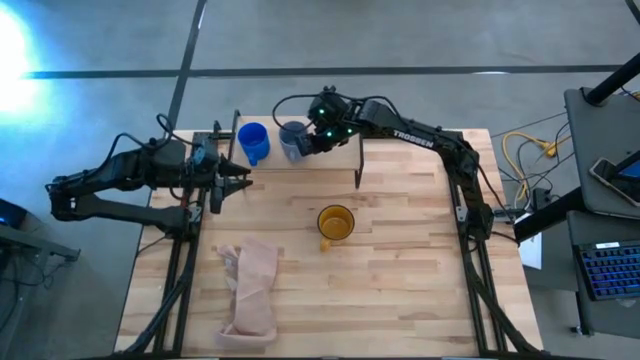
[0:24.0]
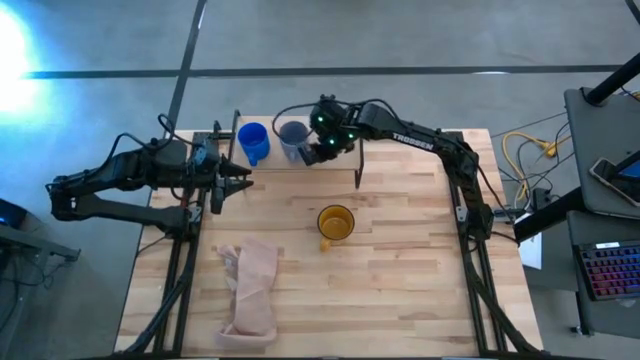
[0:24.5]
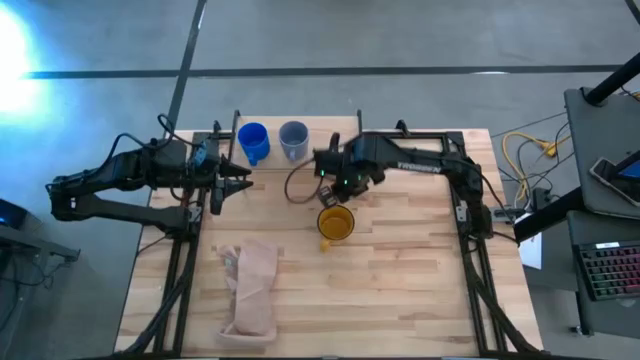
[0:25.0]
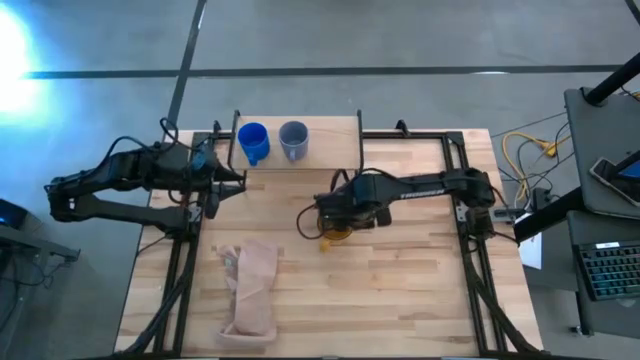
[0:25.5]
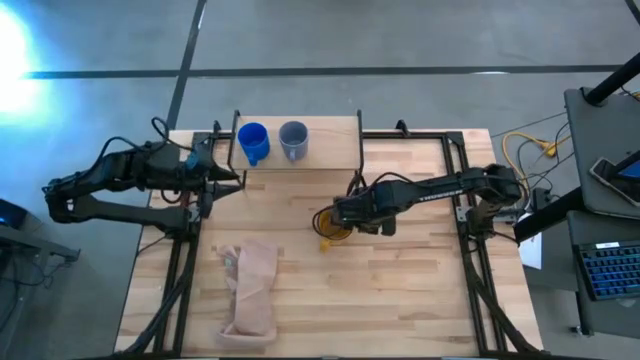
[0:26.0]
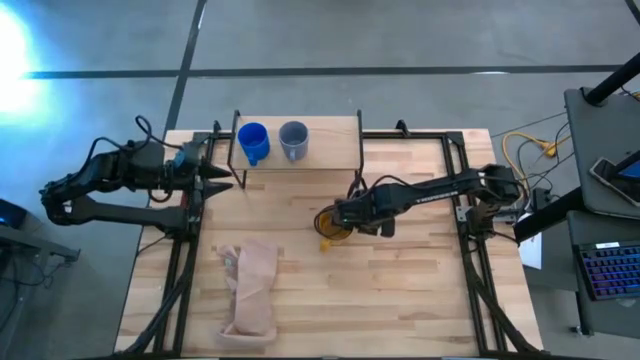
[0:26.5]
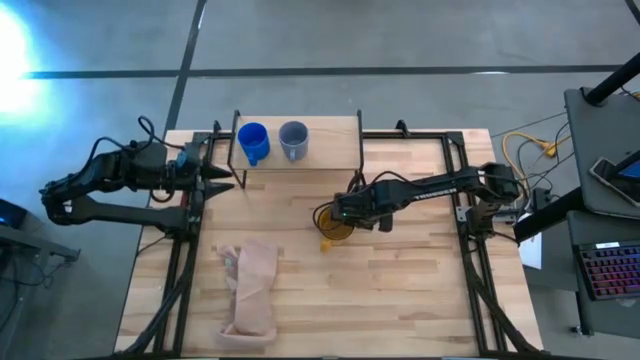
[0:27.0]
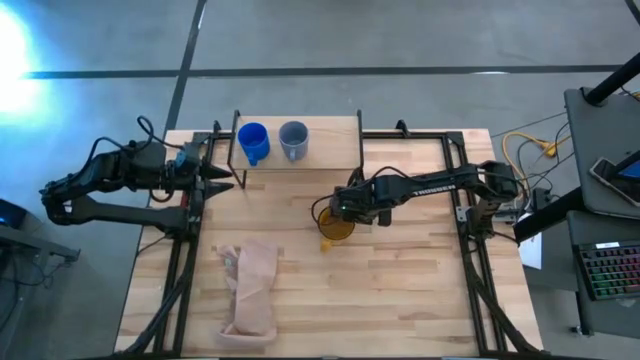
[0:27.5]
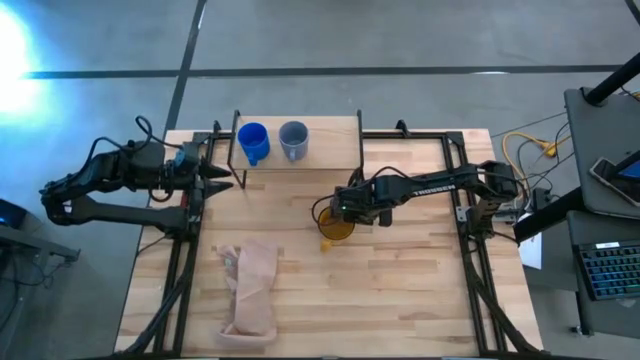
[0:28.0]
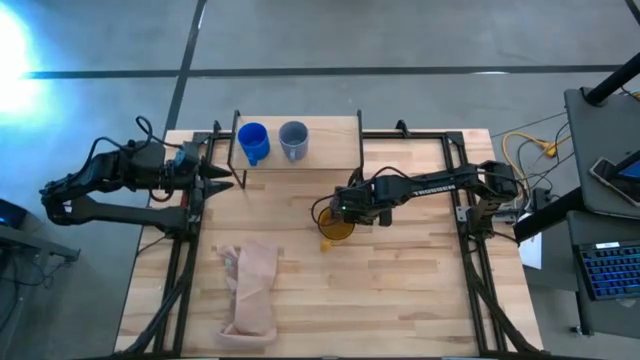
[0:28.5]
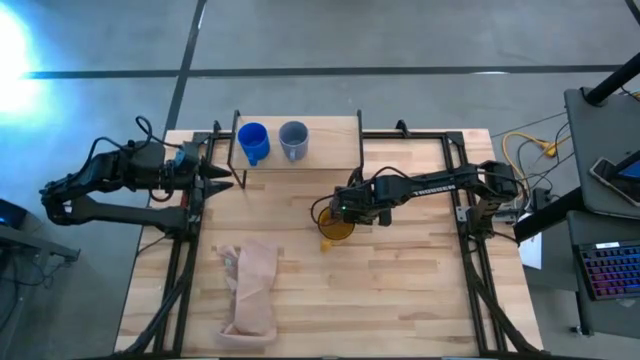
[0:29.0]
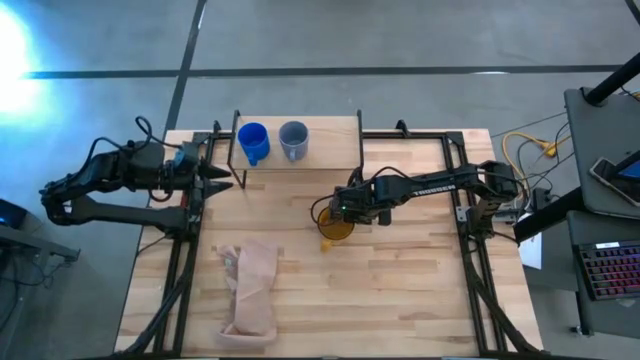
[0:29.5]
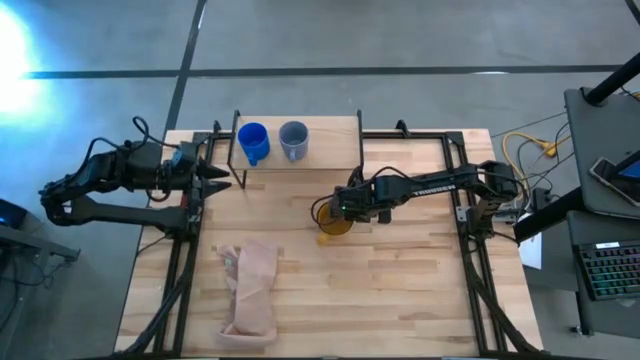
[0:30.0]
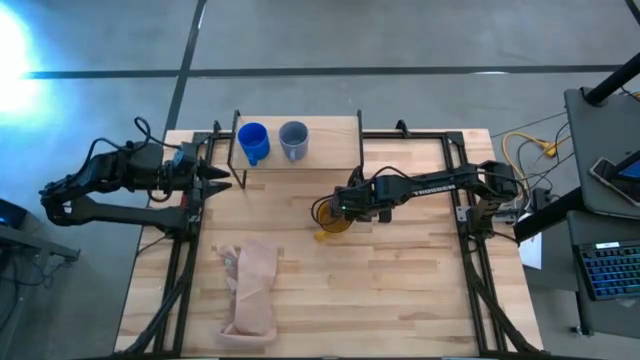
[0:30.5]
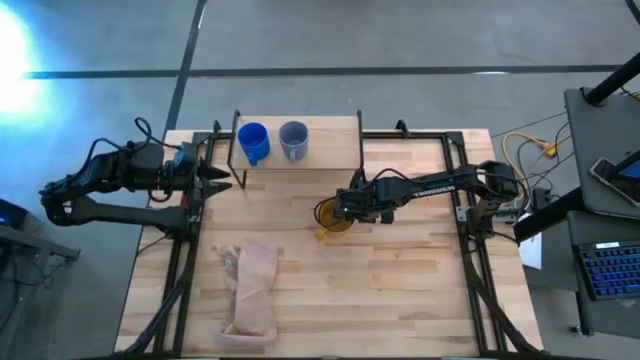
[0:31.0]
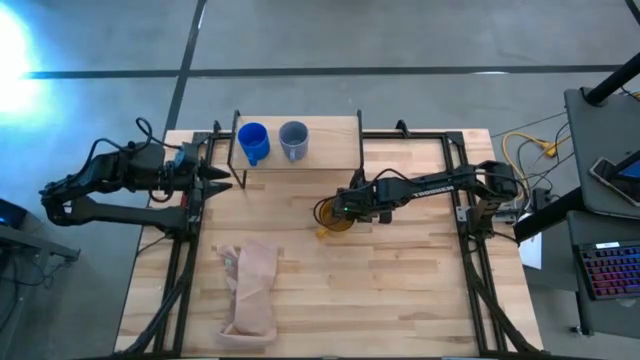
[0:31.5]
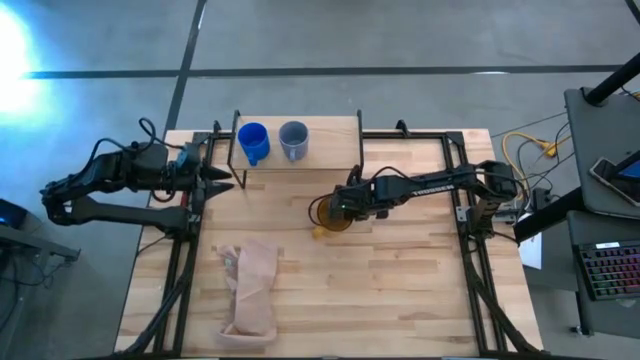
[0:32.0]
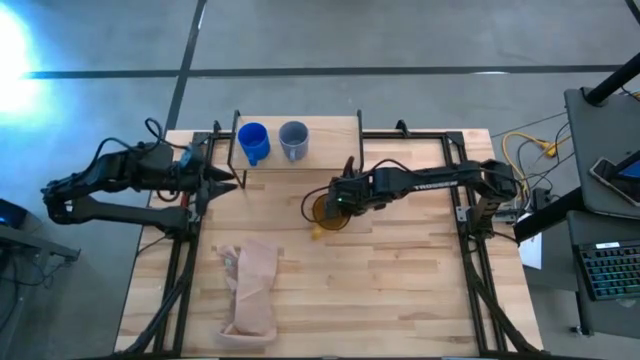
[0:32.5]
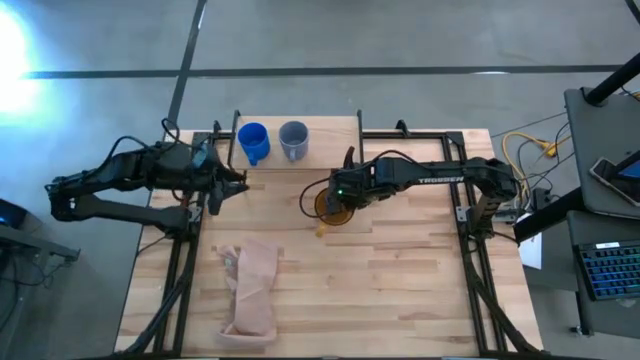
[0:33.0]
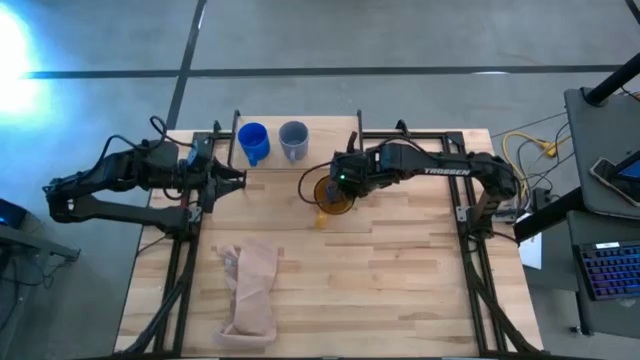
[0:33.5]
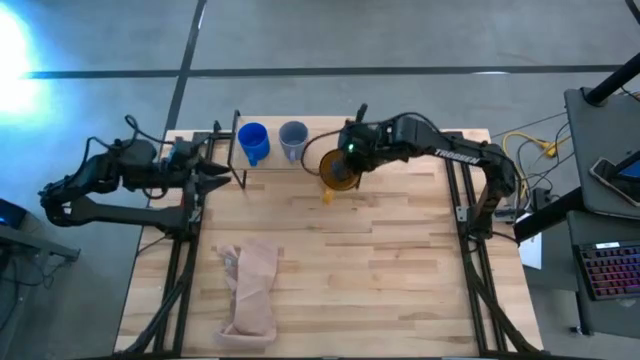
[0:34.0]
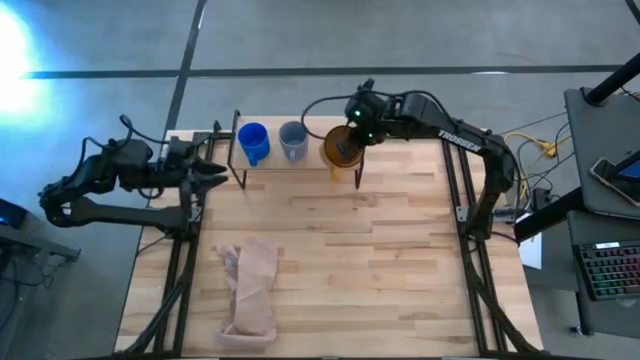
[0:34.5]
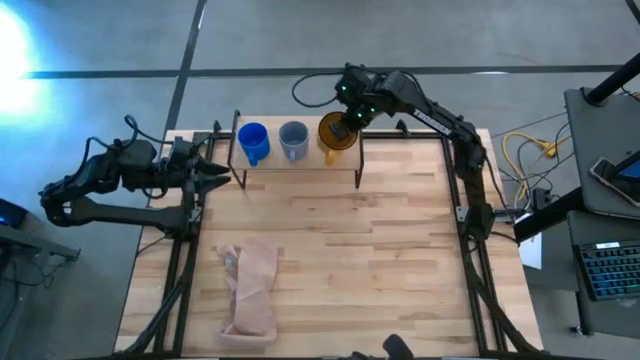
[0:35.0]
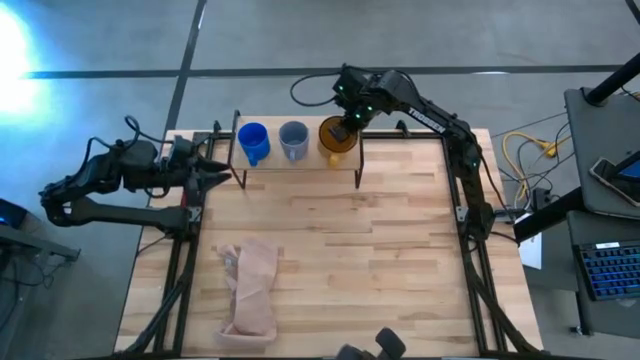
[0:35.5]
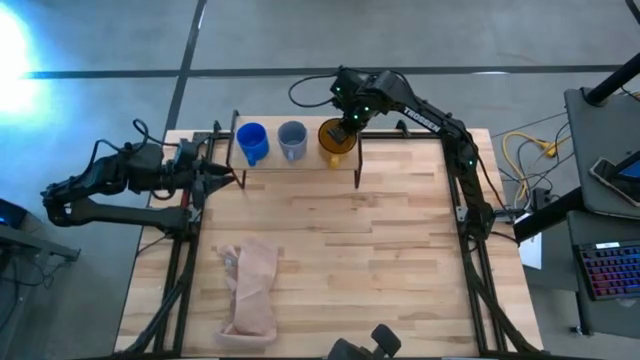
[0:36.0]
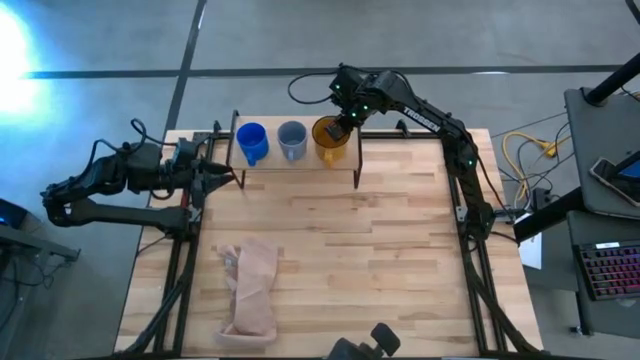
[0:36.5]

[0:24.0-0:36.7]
Task: Stack small to large cups/mugs on shelf
Put the yellow mug on the shelf

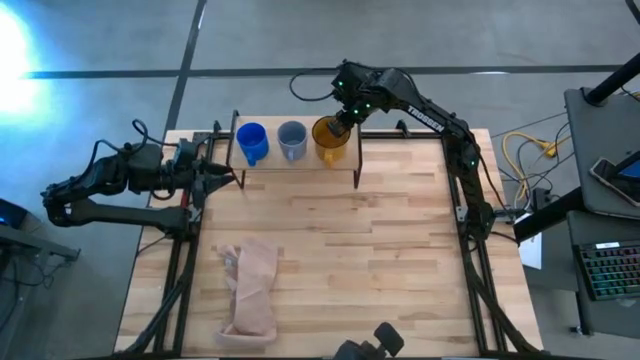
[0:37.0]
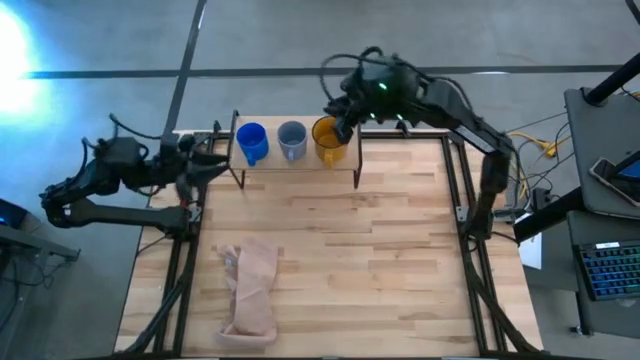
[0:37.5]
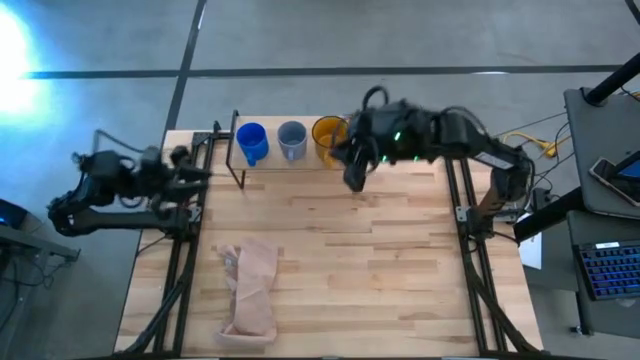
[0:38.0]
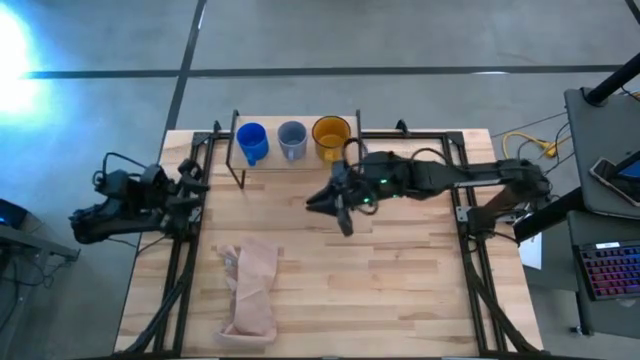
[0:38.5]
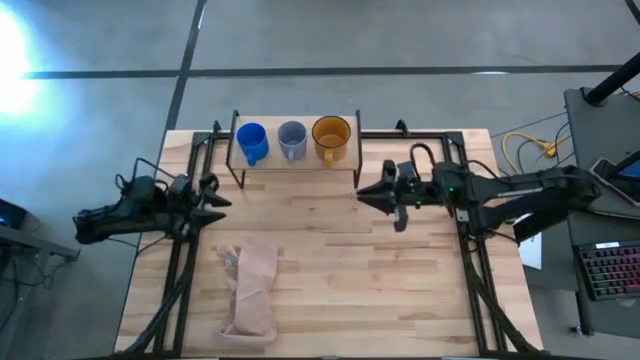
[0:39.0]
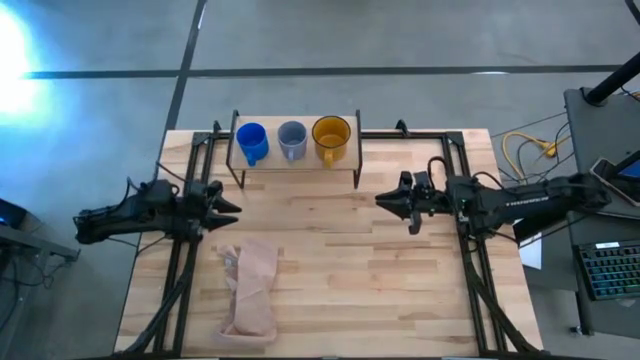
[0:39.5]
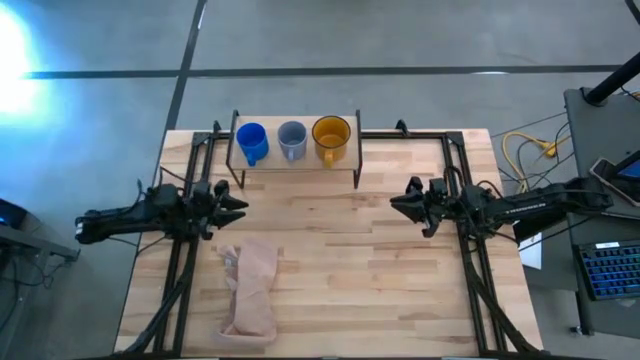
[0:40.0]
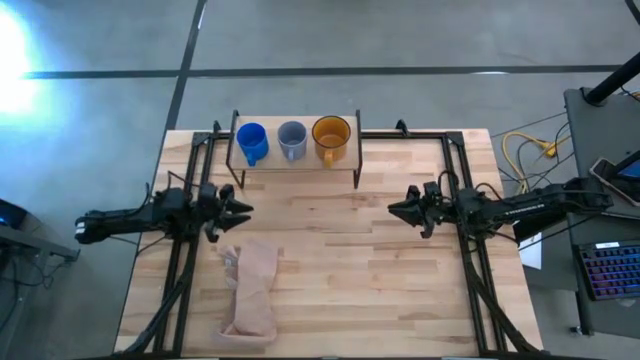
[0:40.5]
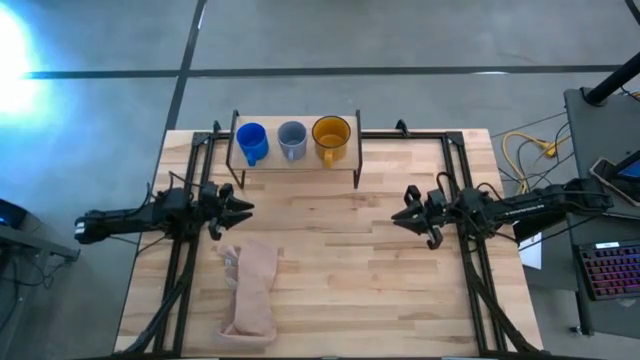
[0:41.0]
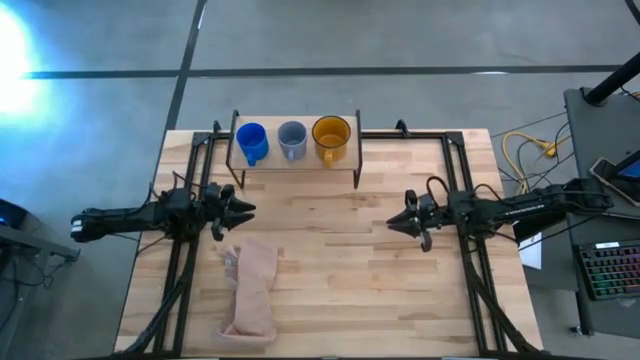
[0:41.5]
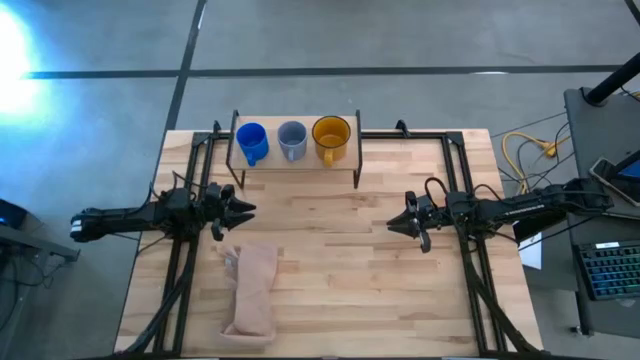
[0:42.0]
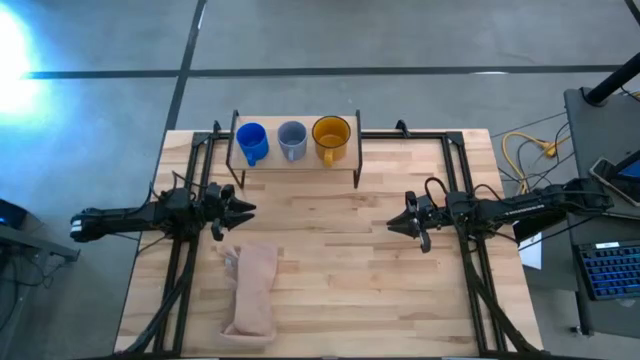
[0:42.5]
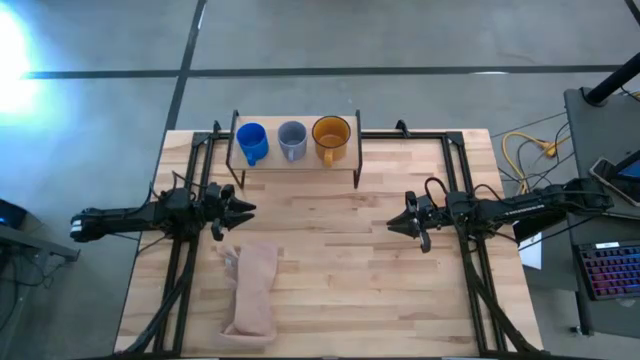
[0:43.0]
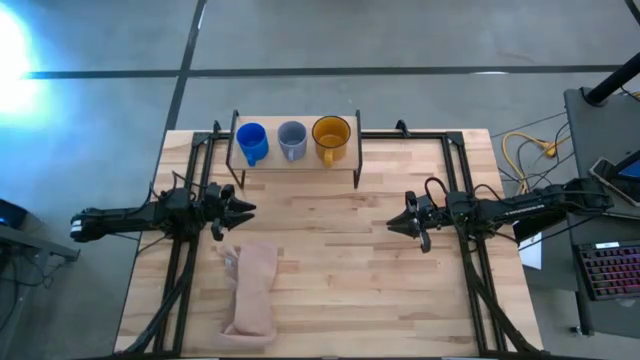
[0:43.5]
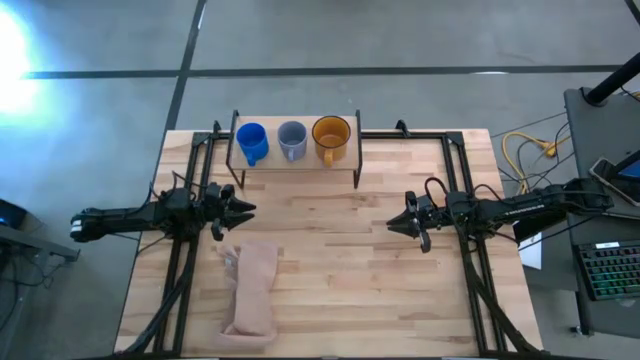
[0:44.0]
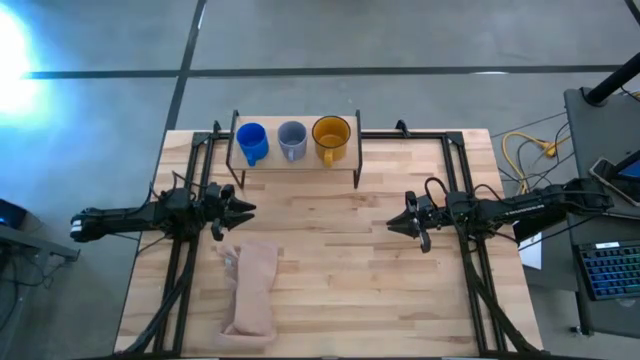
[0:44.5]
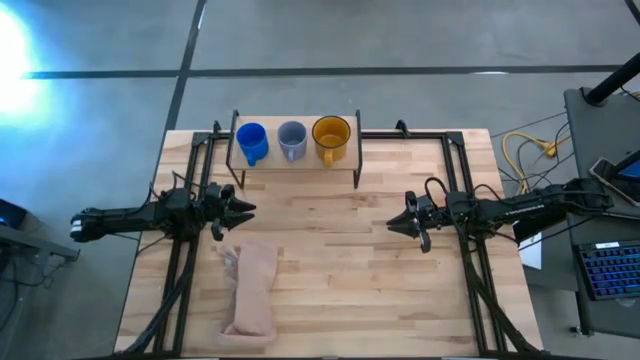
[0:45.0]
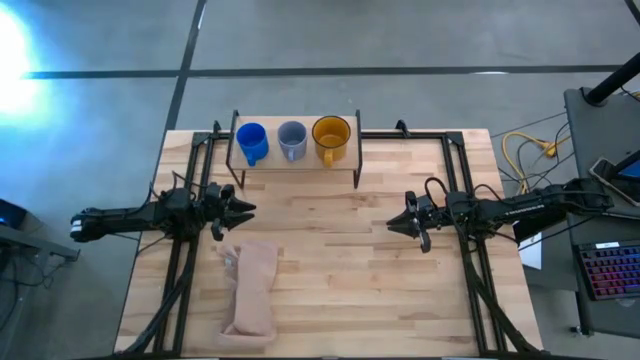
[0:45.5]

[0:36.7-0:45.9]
Return to Home Position
